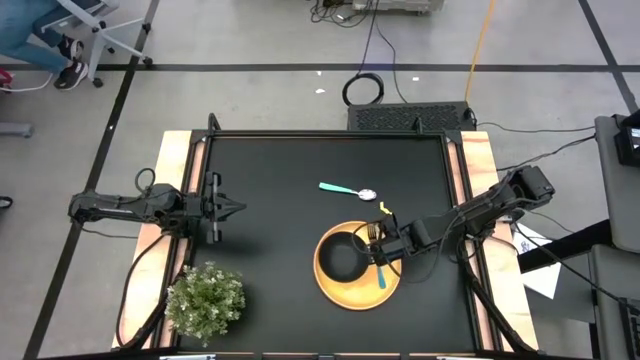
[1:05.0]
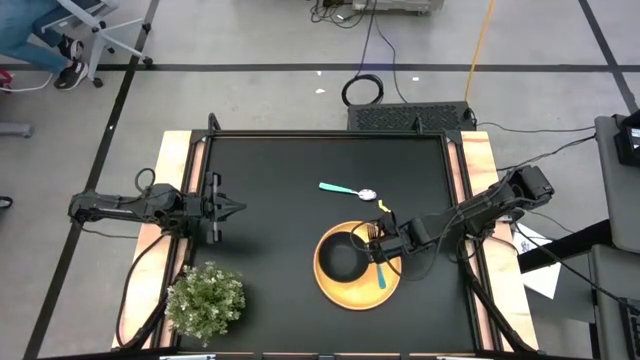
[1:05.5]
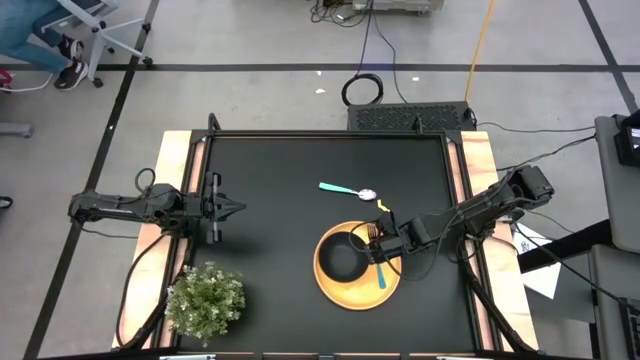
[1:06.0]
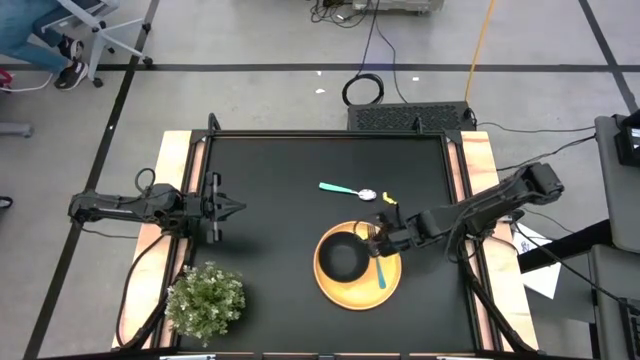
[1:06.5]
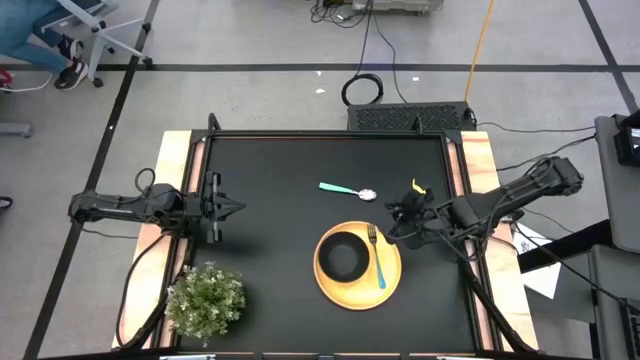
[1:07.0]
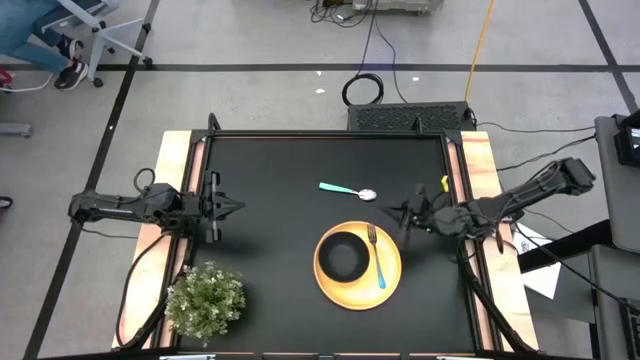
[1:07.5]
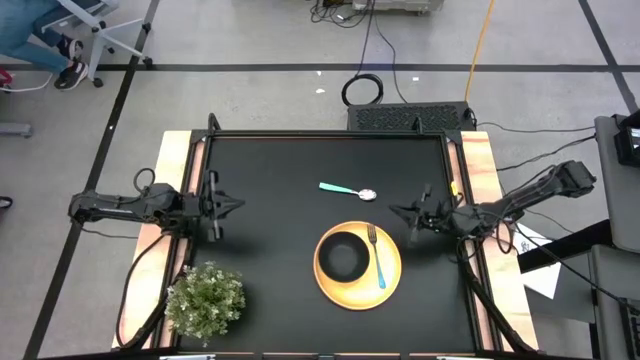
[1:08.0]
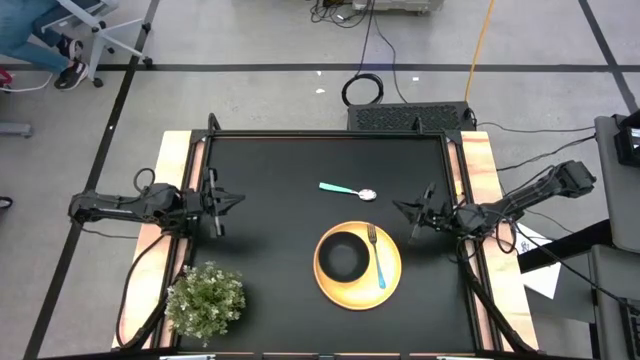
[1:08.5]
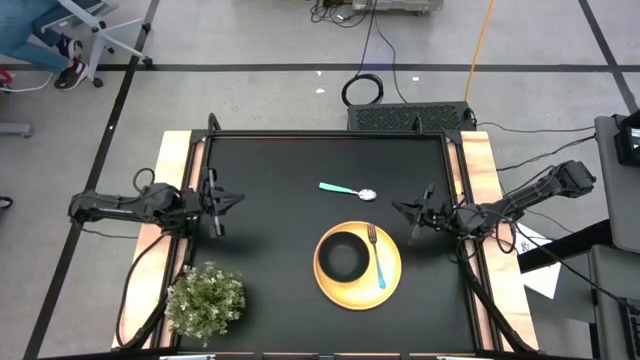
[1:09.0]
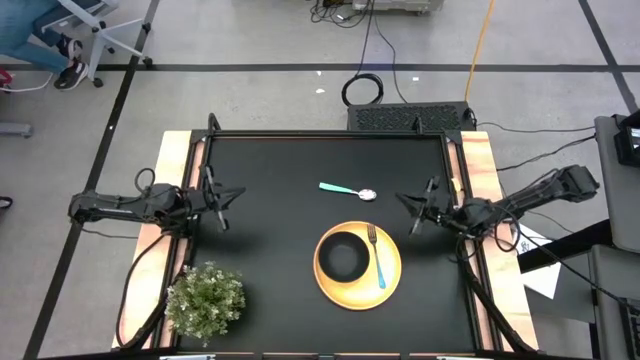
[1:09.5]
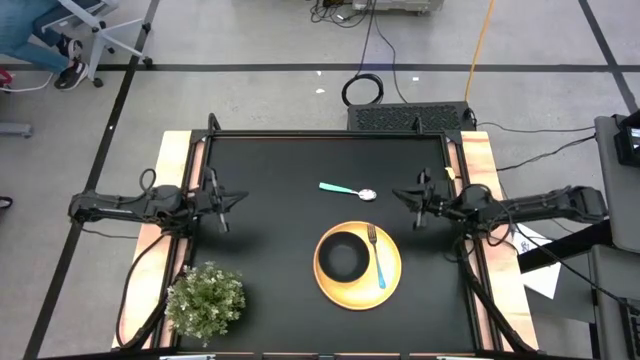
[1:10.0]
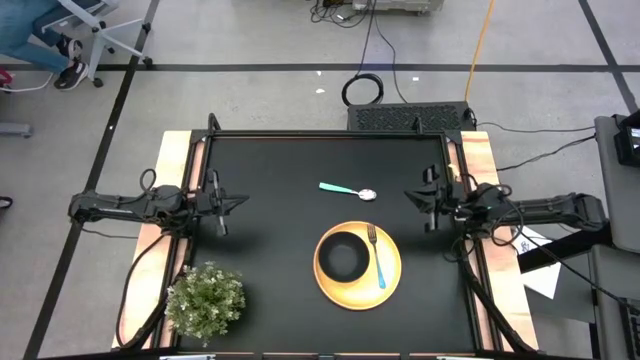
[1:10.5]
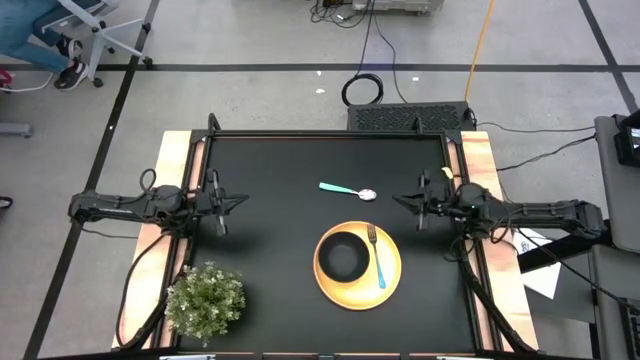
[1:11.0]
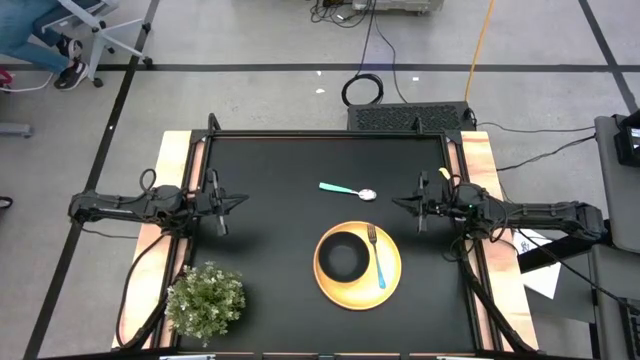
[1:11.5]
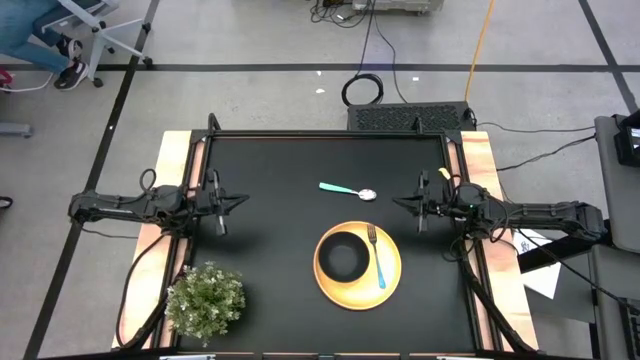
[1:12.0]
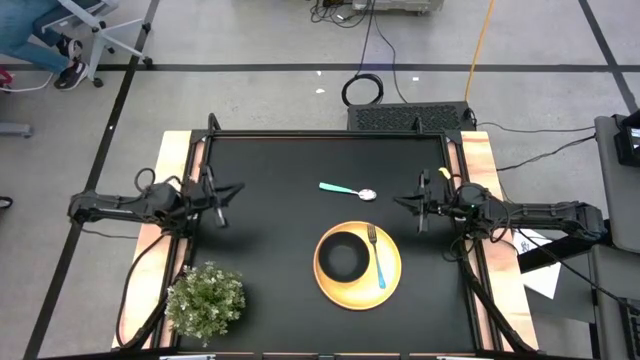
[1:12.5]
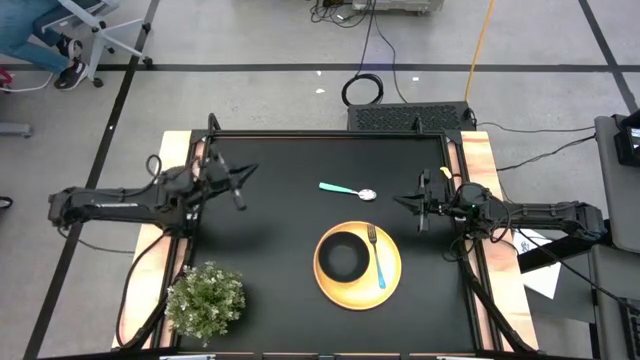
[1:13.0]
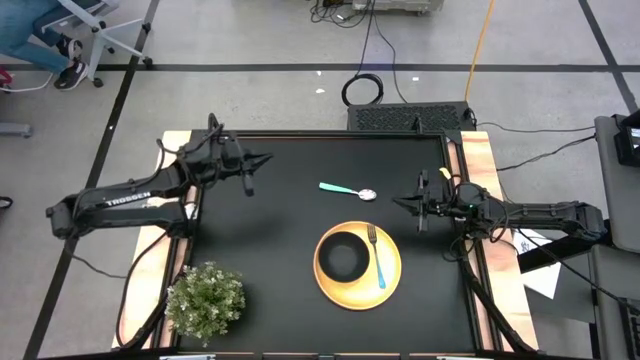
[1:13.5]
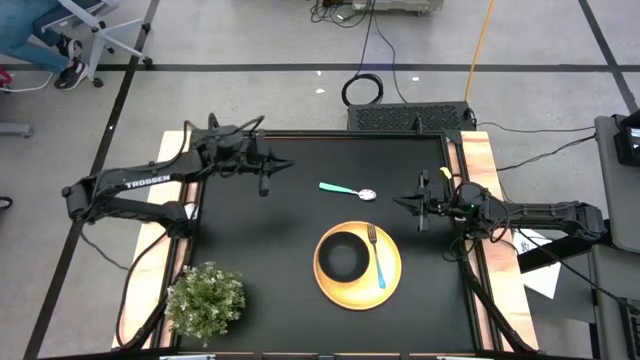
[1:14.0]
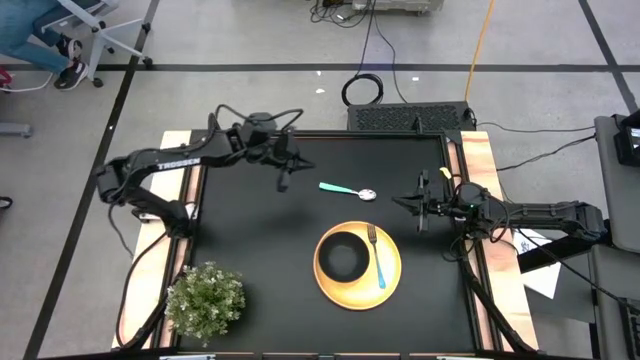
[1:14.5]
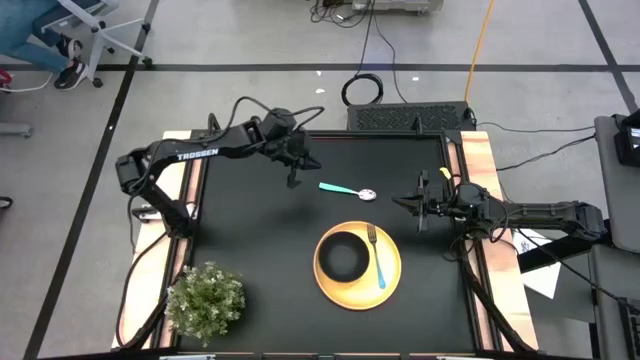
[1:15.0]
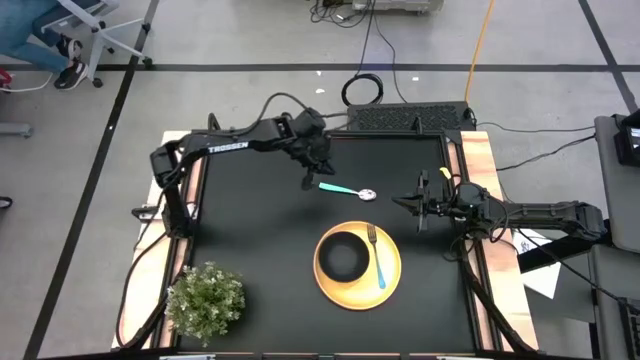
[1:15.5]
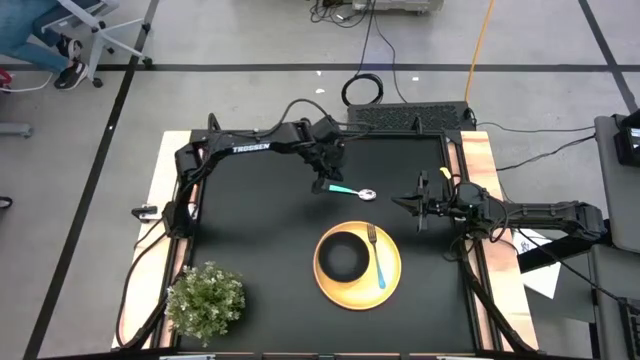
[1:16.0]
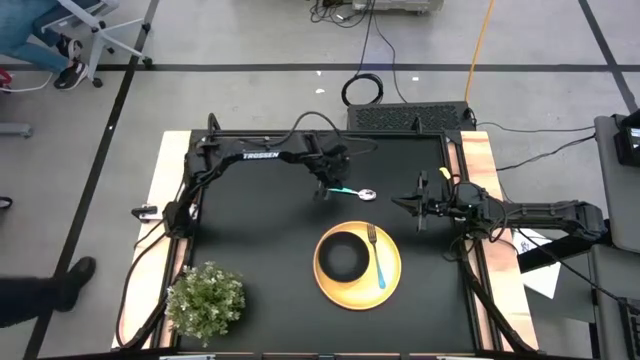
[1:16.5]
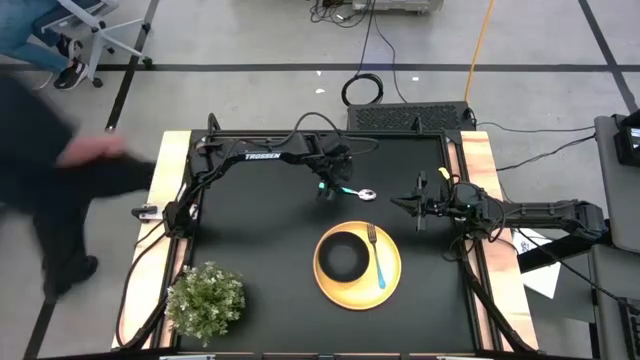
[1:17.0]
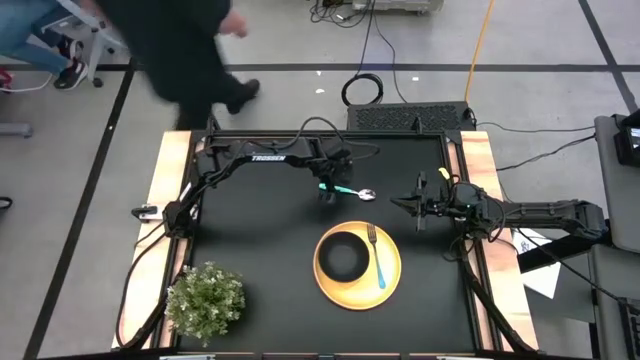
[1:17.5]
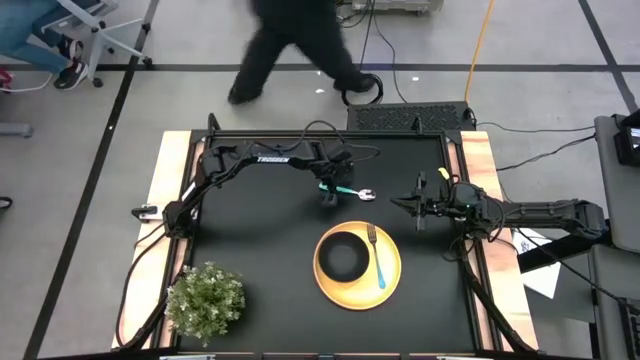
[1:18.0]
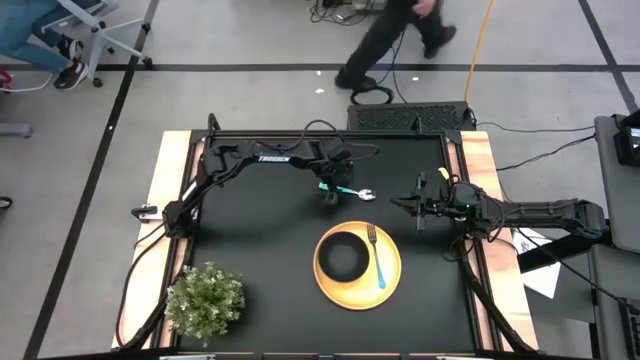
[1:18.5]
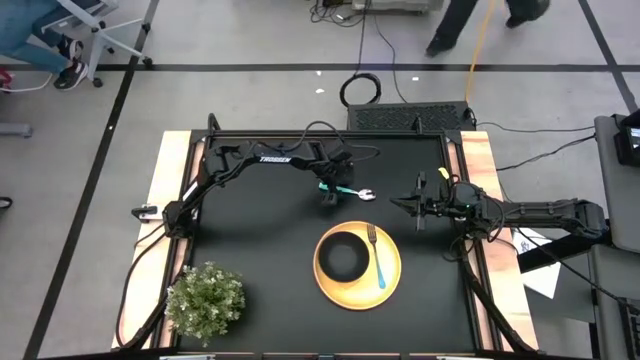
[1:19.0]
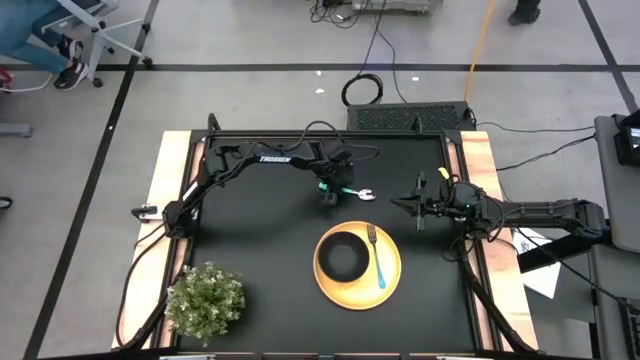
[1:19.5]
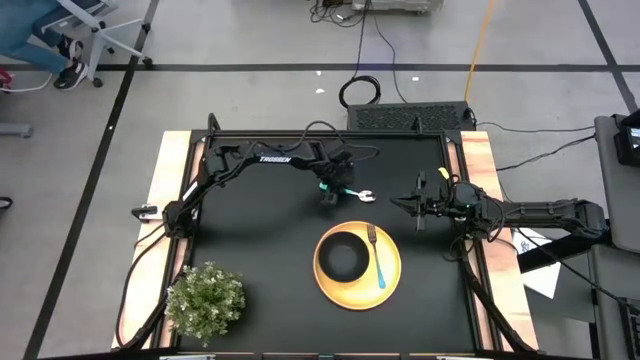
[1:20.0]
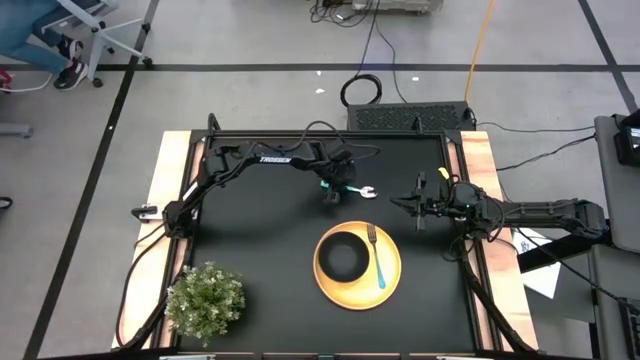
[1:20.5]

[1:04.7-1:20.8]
Task: Set table place
Put the blue spoon into the black bowl

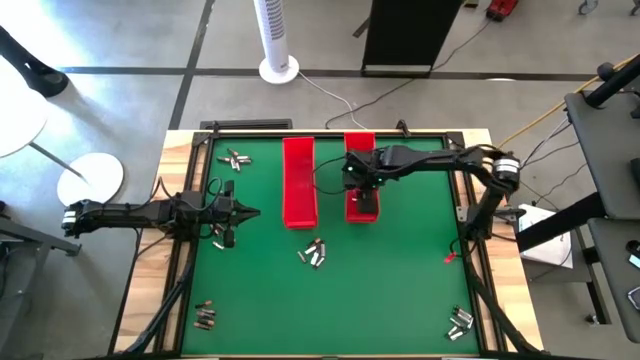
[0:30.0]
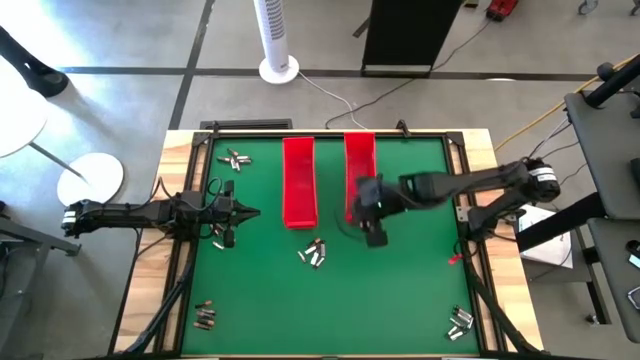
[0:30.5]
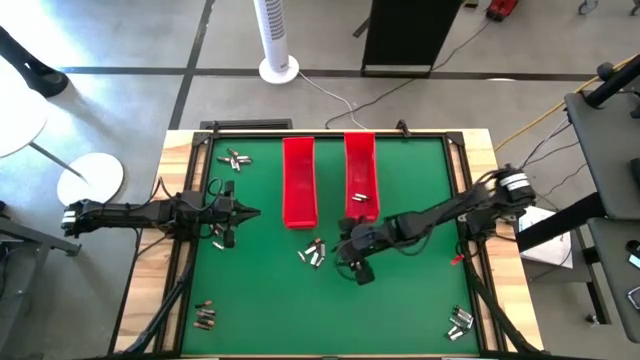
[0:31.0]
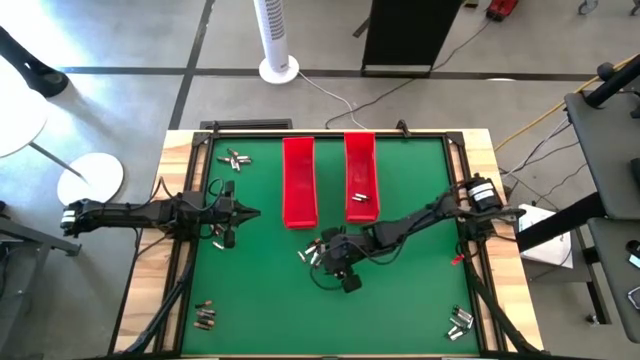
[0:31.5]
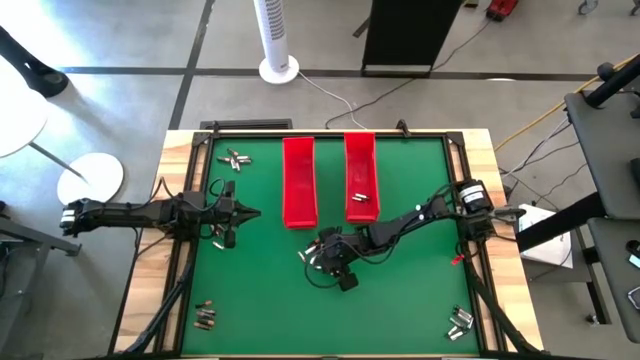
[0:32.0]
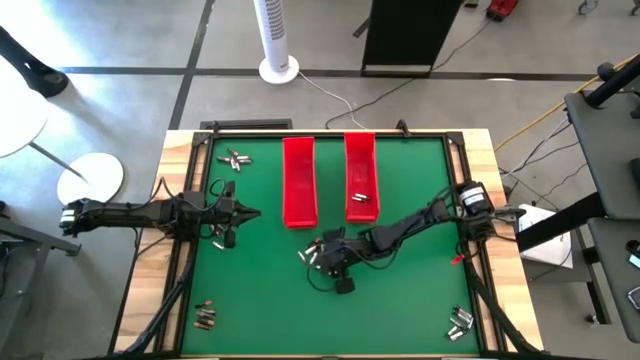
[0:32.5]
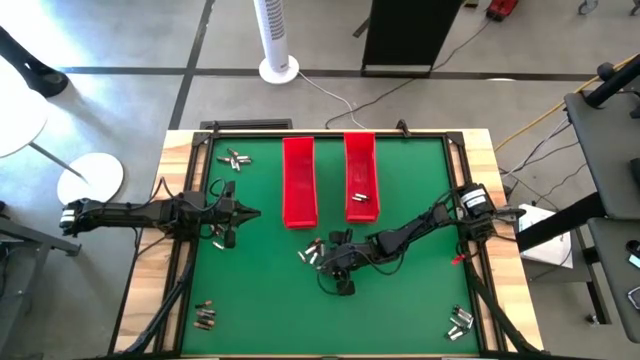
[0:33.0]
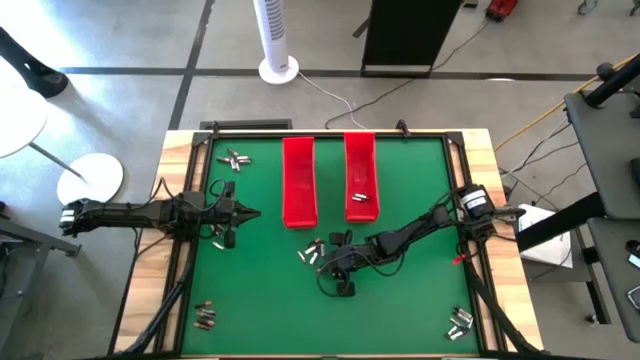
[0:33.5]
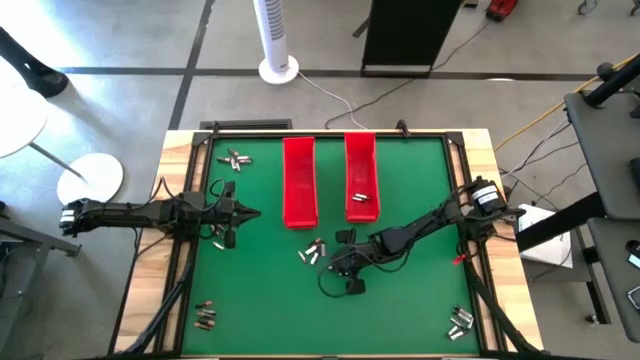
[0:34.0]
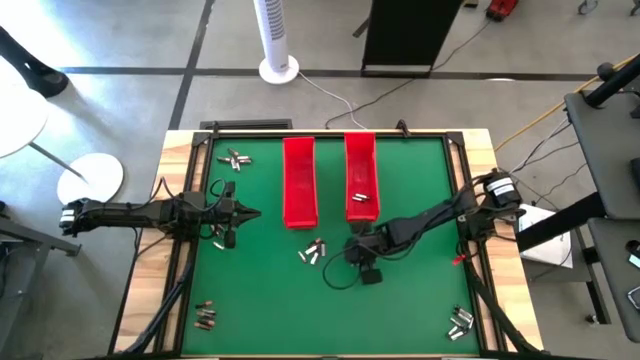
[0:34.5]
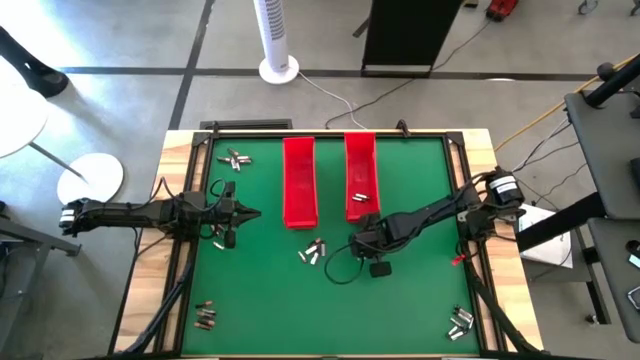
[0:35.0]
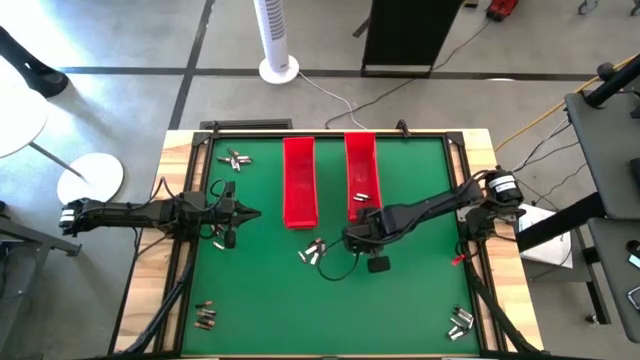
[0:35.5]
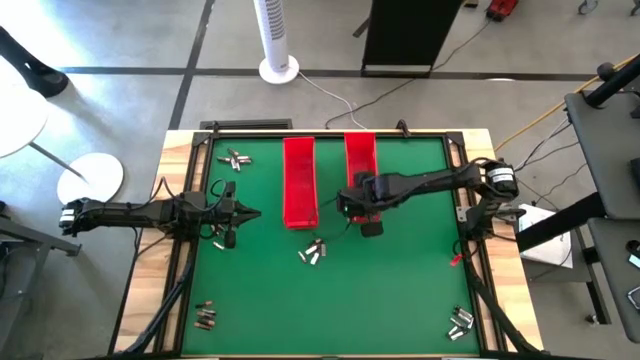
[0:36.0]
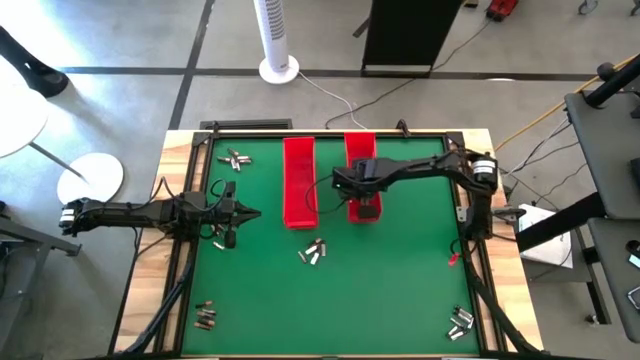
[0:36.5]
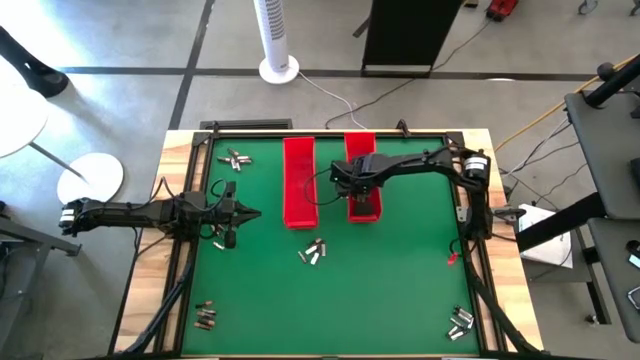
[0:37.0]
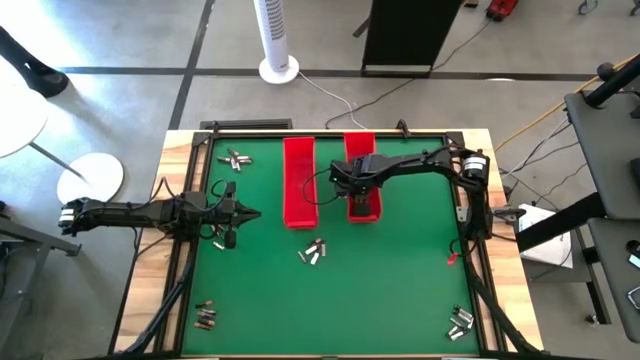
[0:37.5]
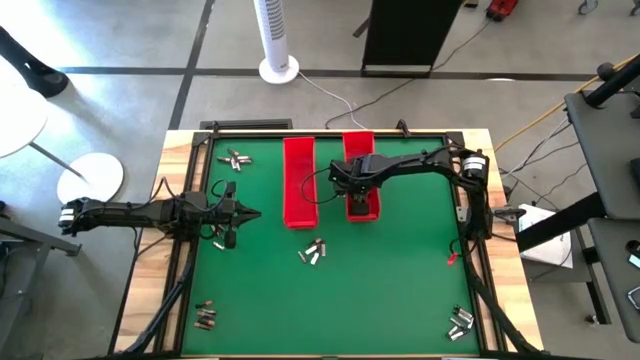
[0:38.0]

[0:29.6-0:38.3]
Task: Sort batteries
Put the silver battery into the right red bin
